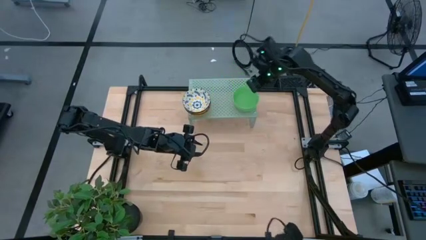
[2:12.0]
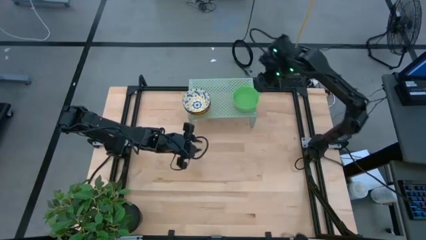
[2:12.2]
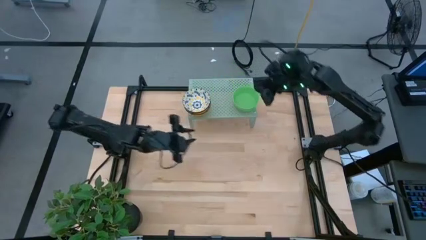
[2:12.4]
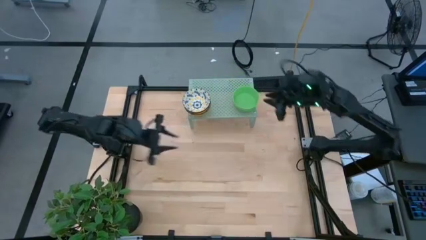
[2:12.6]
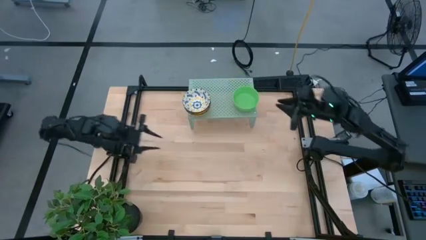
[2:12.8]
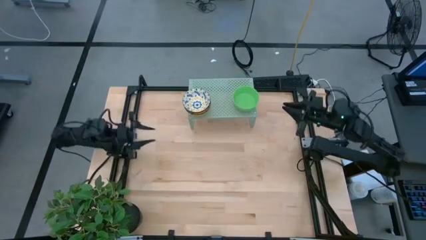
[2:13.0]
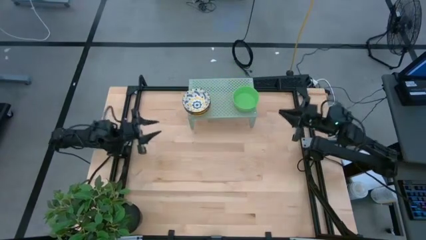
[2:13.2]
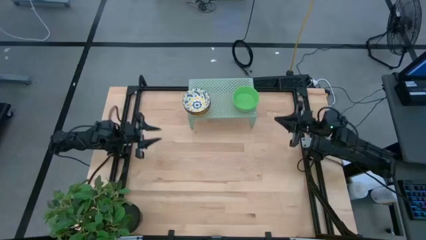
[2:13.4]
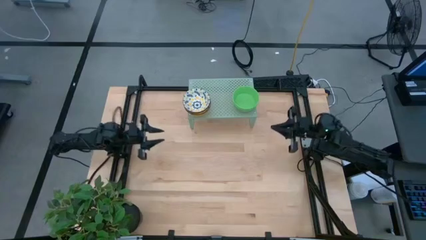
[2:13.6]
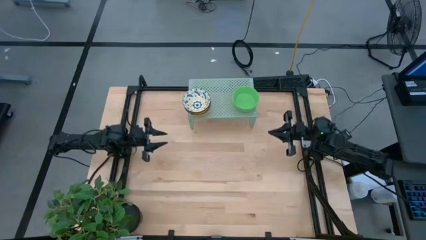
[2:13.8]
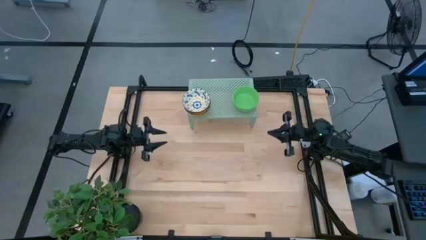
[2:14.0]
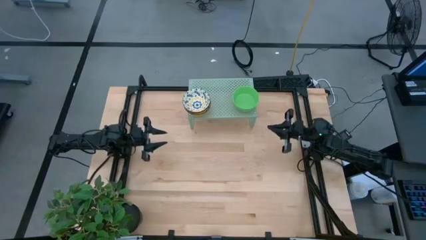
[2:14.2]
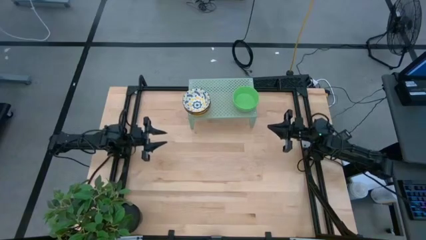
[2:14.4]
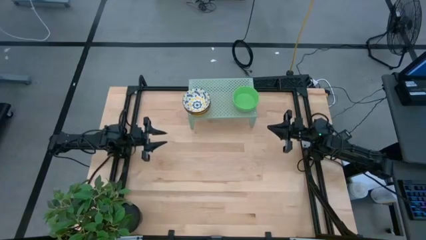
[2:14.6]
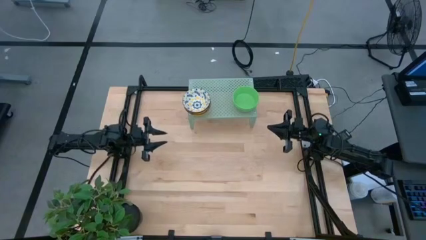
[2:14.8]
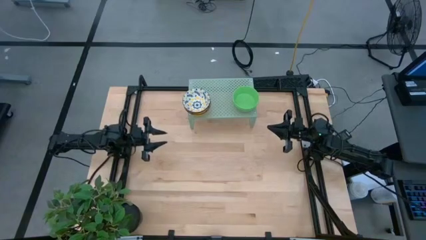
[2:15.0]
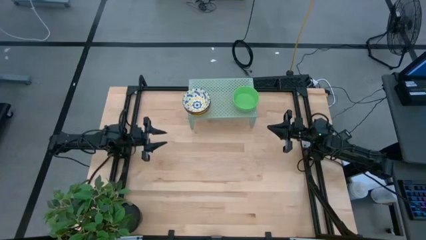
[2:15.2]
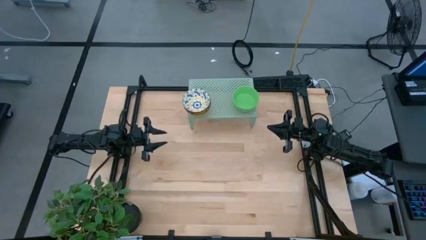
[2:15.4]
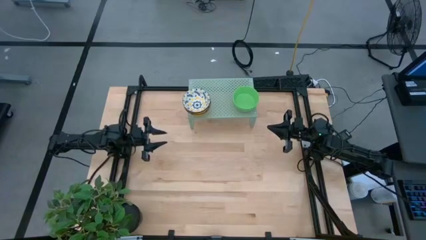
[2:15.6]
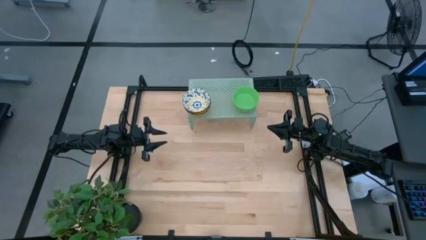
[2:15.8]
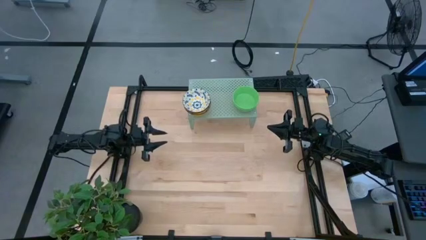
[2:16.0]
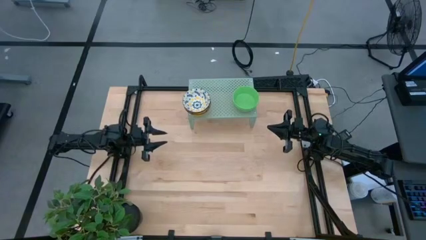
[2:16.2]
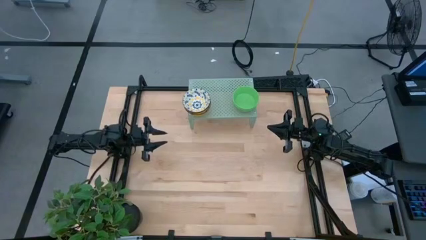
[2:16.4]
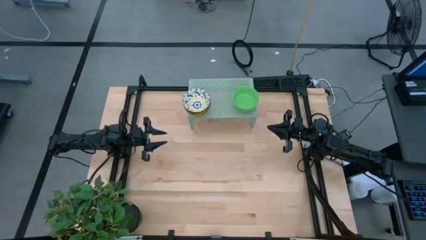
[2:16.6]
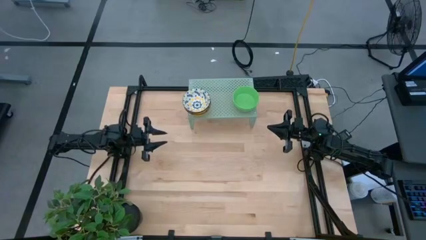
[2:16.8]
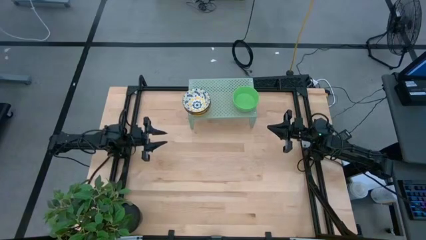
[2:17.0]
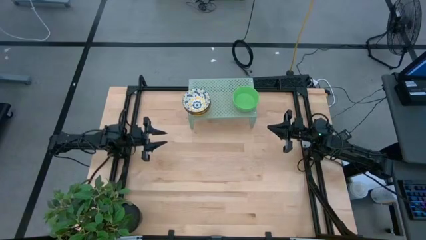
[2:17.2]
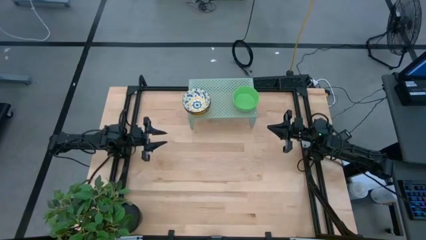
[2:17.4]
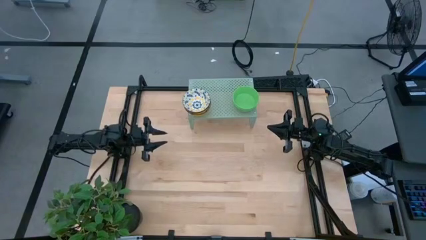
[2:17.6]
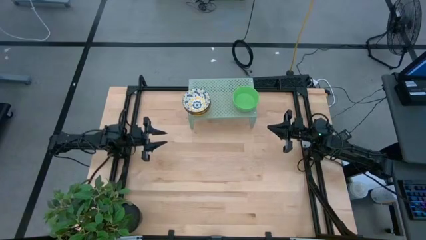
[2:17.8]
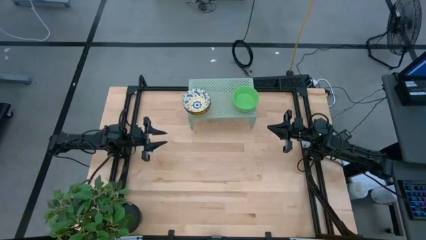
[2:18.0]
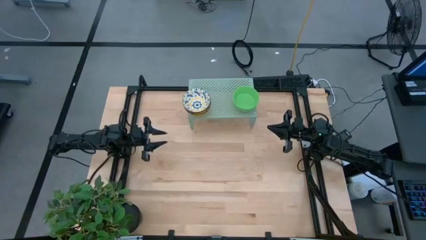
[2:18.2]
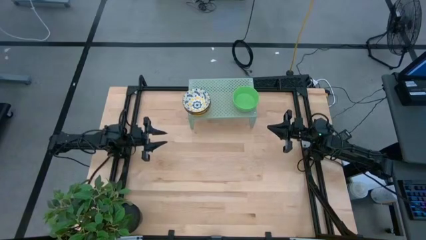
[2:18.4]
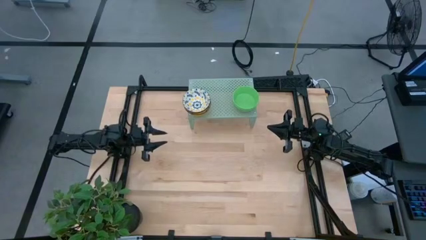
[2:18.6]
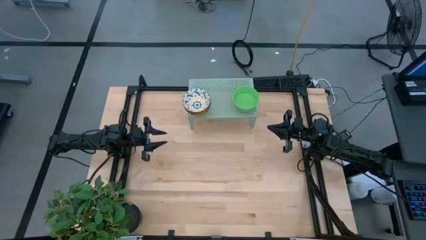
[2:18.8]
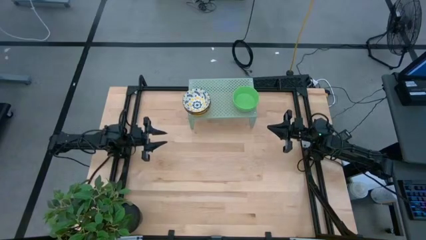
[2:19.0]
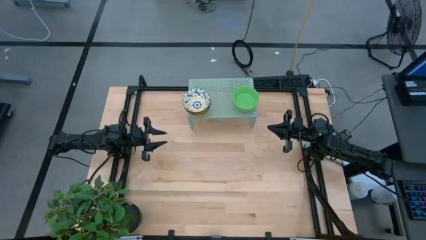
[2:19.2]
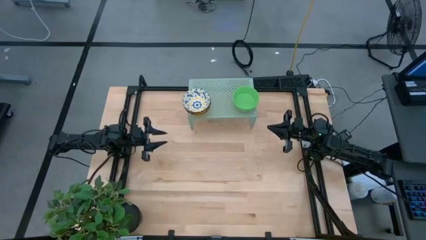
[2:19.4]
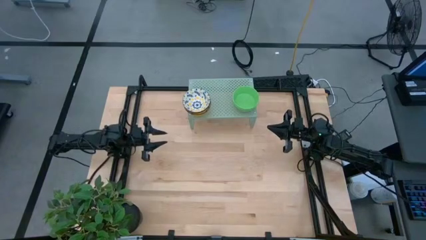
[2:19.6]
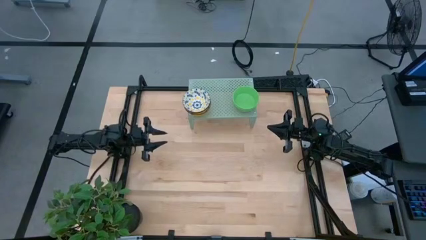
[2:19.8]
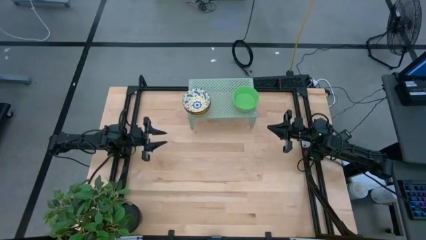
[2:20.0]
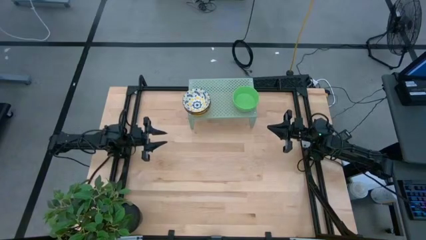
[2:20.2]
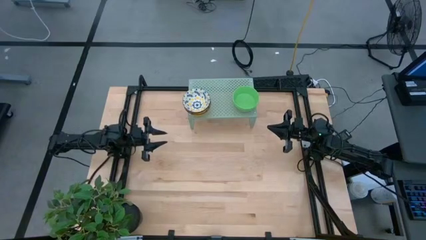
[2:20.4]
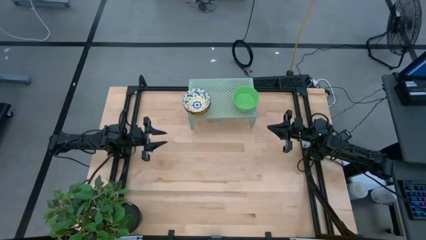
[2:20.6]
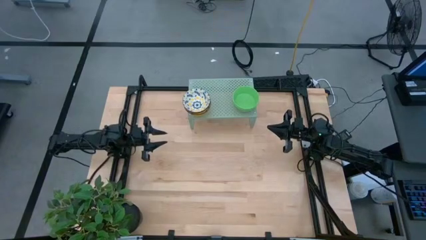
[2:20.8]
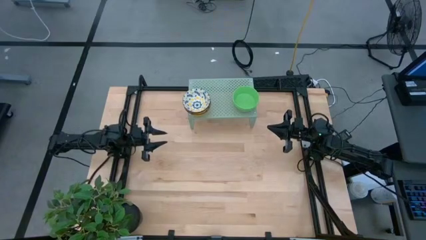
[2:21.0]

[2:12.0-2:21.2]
Task: Pick & Place Mini bowls
Return to Home Position

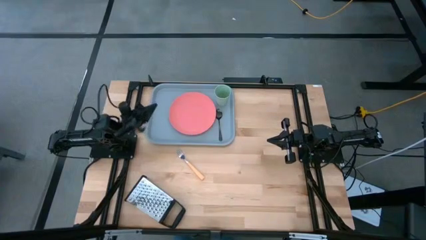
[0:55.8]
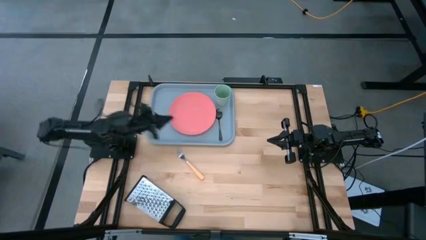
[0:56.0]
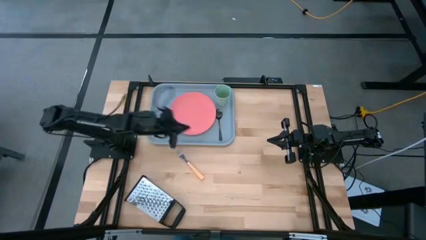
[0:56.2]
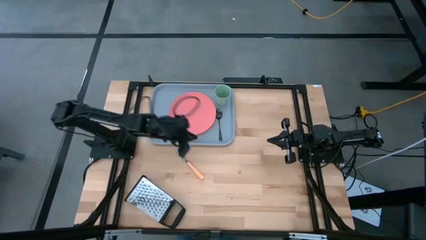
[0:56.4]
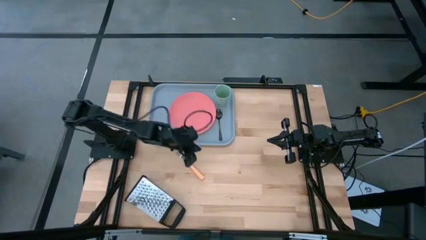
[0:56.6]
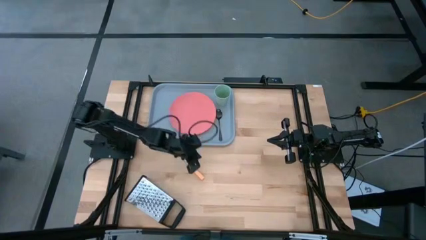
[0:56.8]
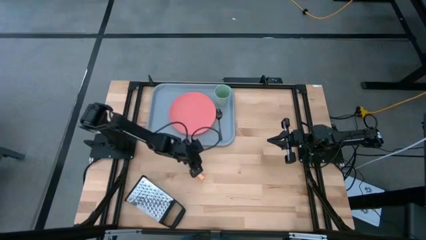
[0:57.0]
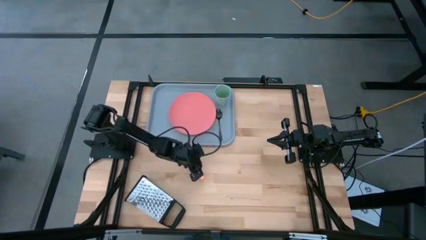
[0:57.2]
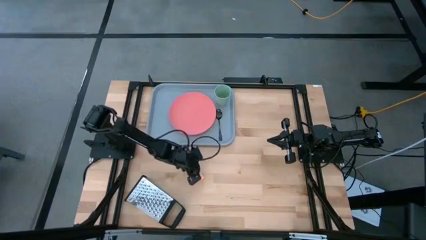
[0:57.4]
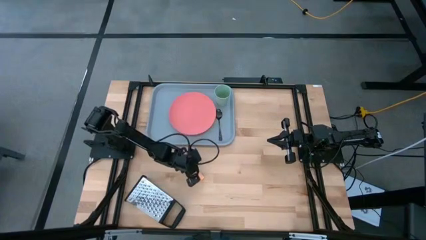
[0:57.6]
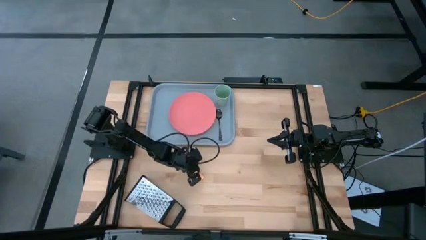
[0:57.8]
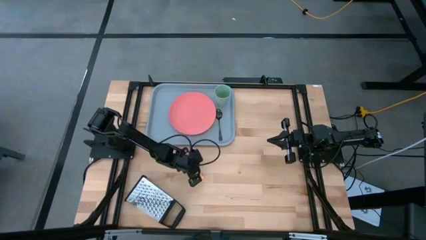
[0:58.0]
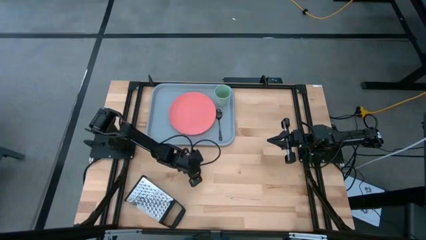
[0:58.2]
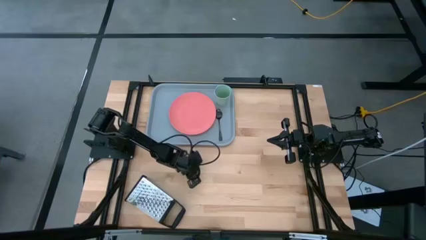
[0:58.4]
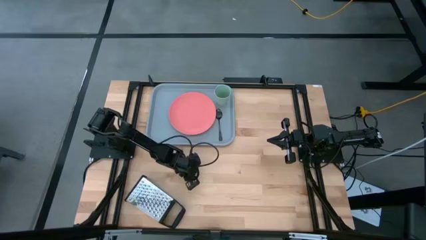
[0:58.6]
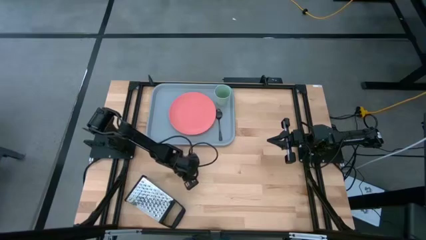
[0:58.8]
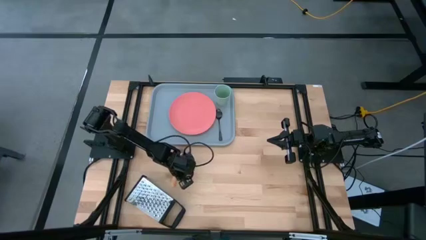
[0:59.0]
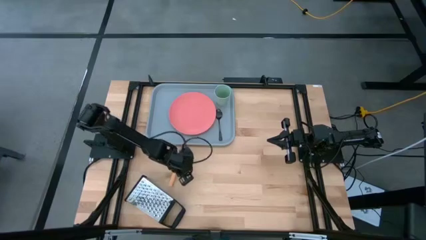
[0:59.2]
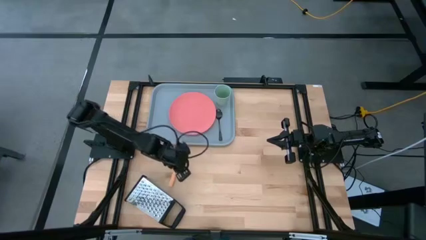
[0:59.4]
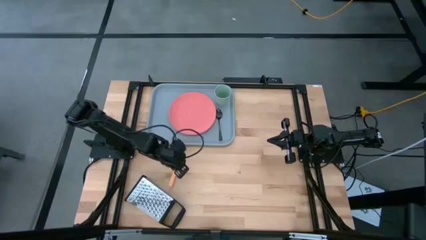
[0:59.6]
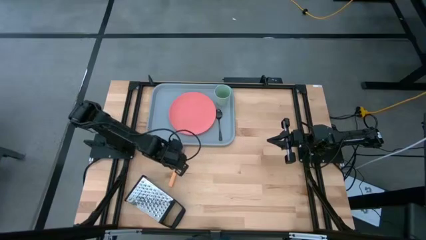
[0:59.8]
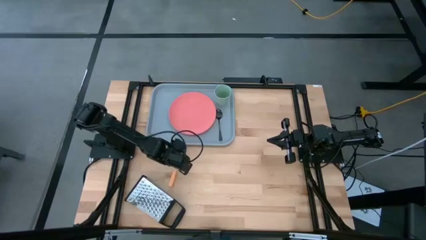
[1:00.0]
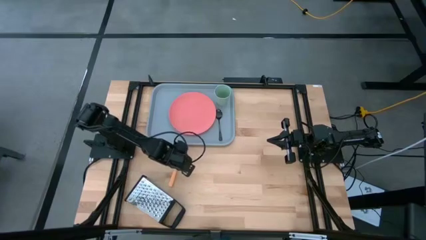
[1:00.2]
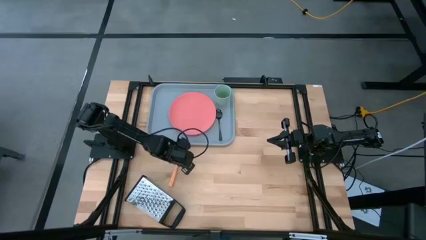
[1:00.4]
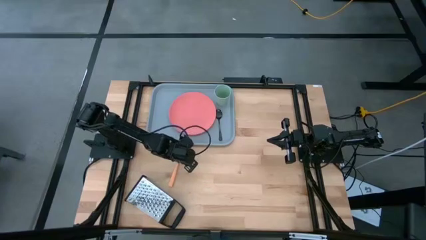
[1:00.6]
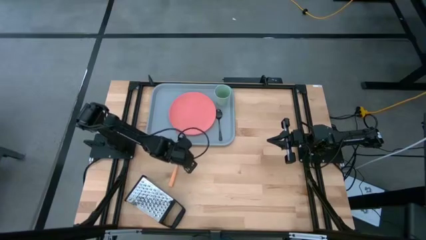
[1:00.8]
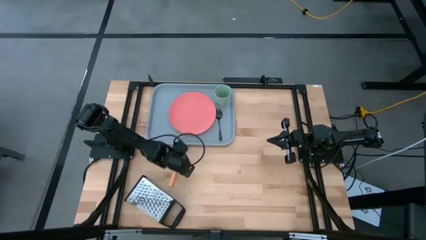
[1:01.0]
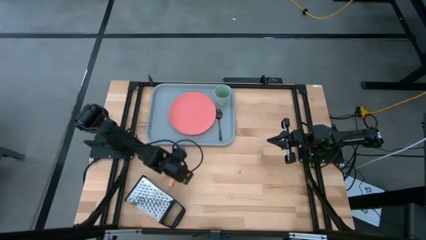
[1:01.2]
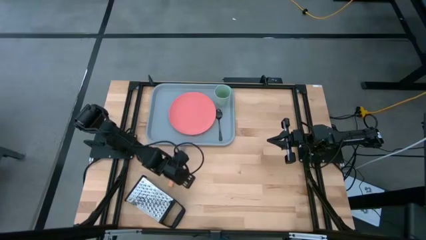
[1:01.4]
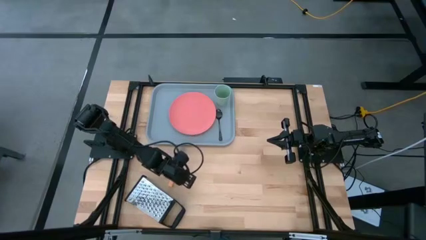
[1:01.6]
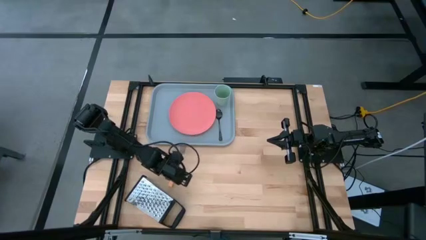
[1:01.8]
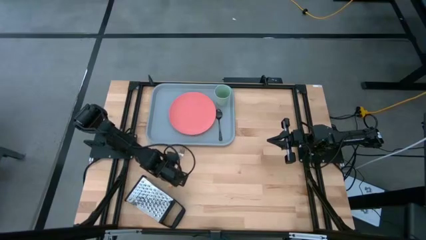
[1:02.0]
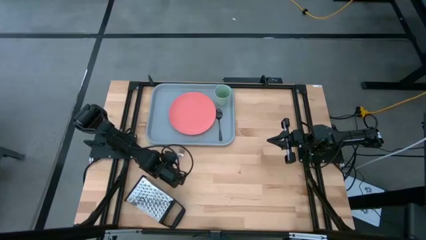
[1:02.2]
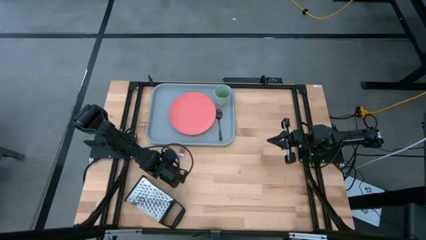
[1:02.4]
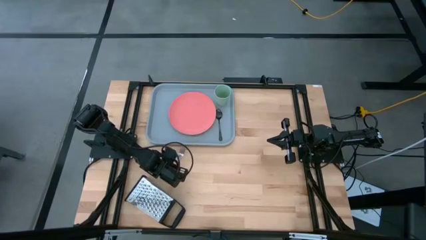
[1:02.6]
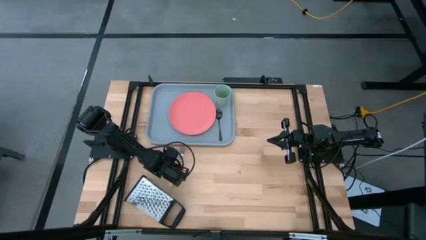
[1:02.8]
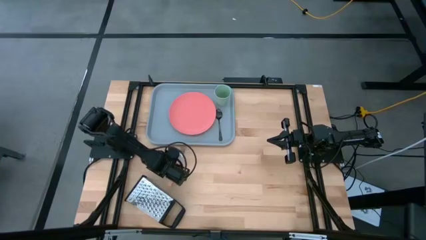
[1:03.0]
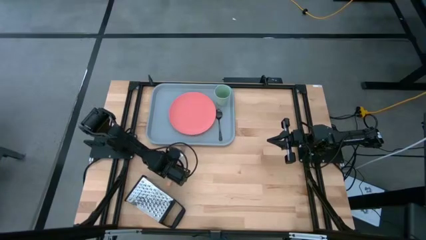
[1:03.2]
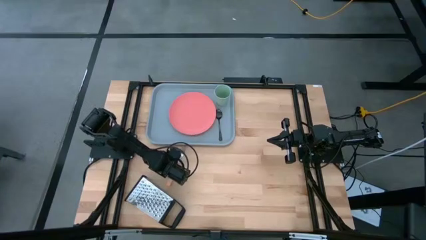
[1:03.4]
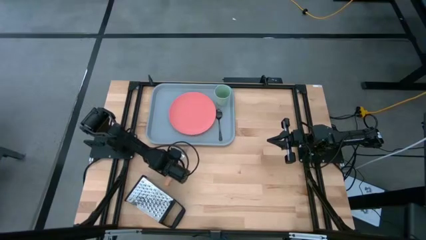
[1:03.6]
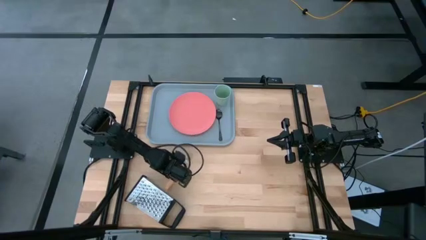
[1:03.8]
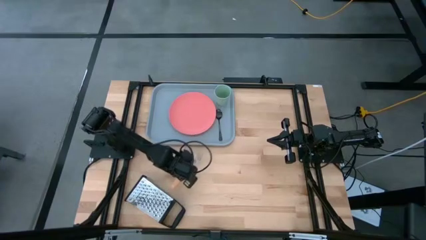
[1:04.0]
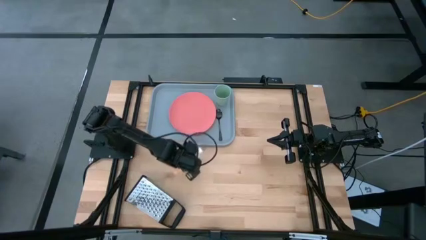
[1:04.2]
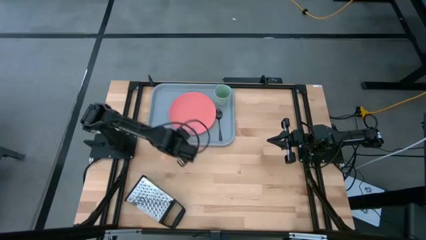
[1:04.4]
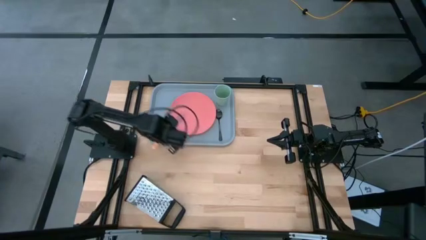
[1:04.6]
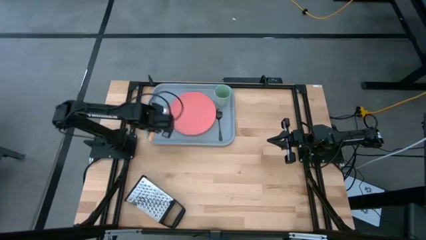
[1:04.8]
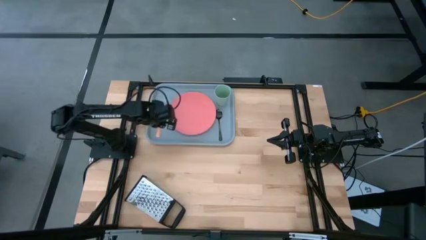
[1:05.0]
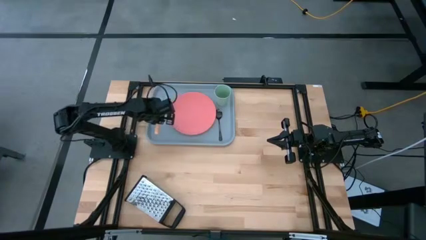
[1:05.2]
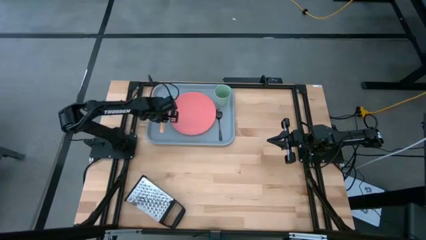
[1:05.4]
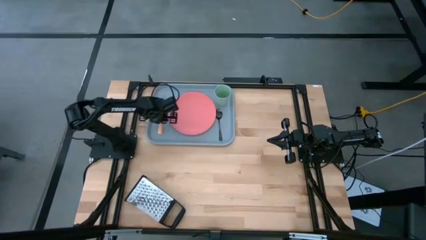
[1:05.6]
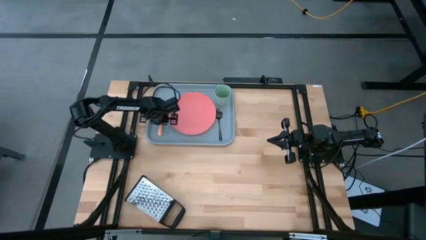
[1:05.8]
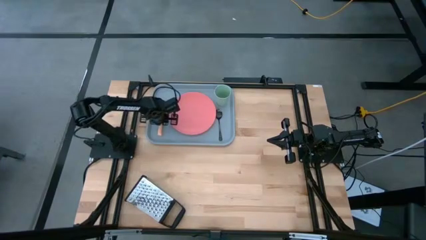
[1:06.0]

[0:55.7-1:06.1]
Task: Pick and place plate/cup/fork/spoon on tray
Put the orange fork on the gray serving tray beside the pink plate
